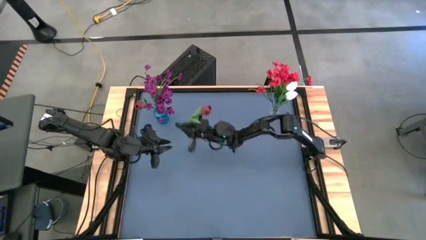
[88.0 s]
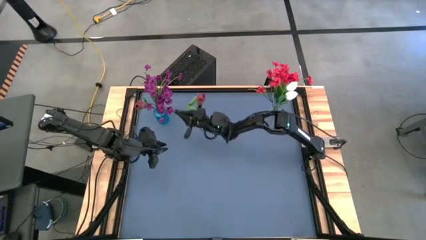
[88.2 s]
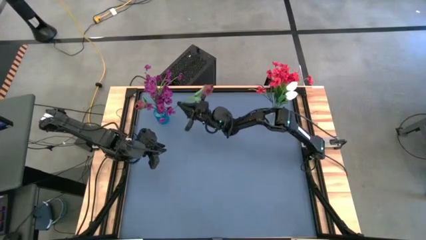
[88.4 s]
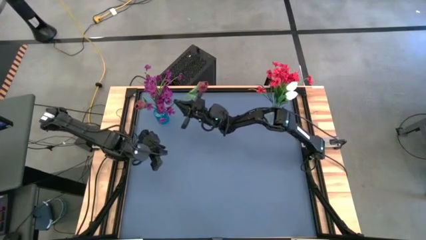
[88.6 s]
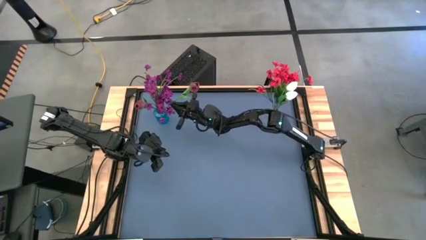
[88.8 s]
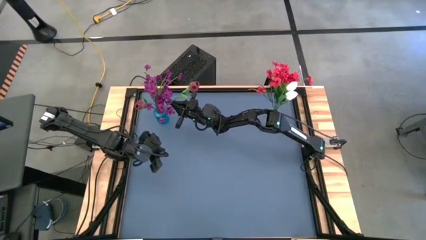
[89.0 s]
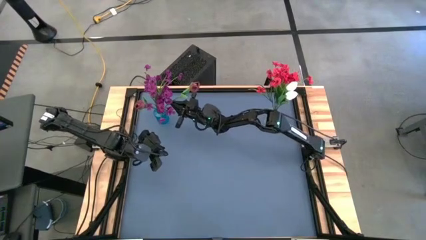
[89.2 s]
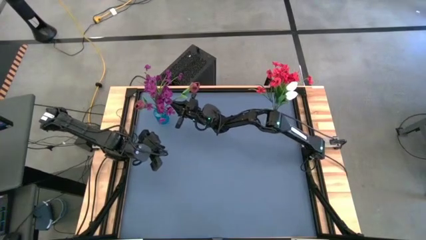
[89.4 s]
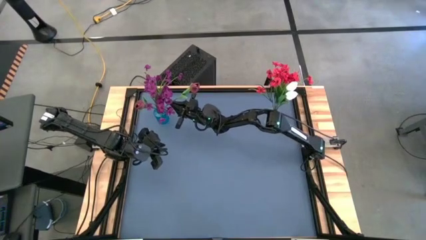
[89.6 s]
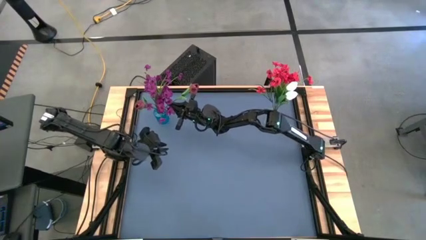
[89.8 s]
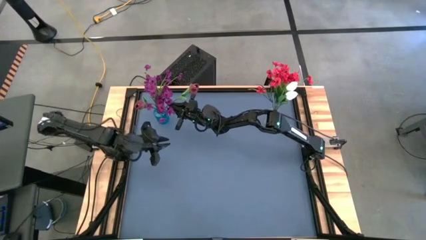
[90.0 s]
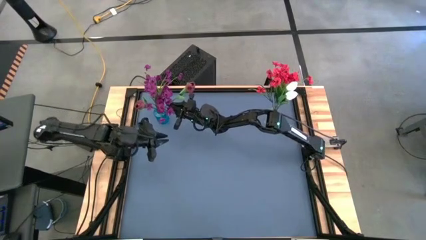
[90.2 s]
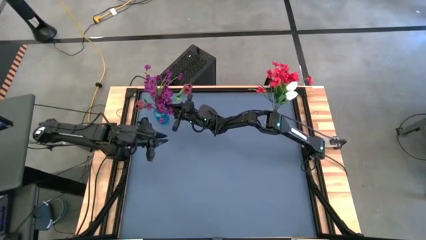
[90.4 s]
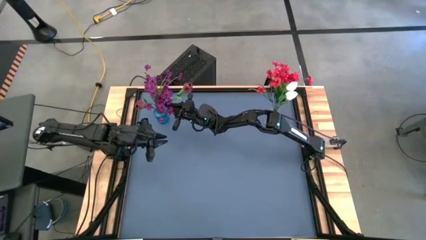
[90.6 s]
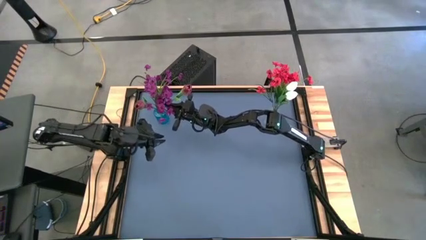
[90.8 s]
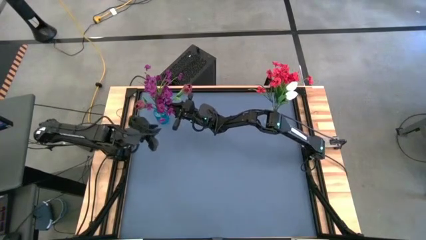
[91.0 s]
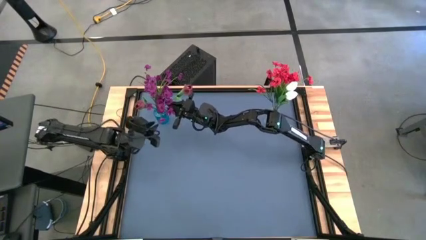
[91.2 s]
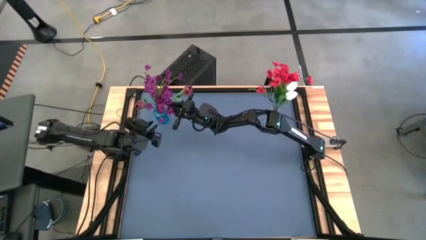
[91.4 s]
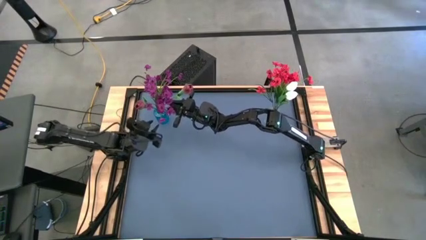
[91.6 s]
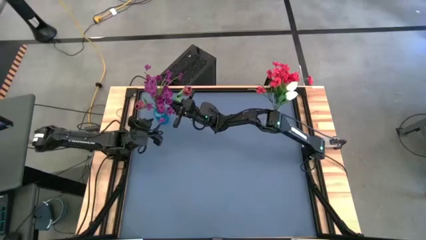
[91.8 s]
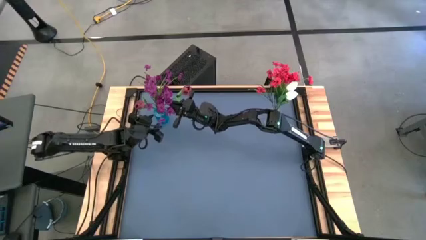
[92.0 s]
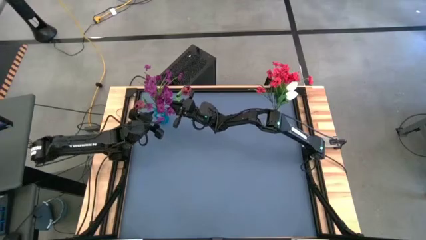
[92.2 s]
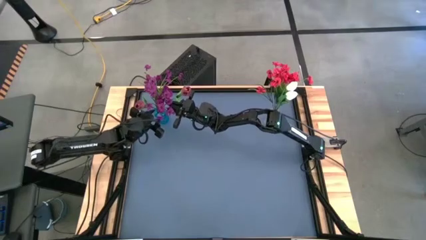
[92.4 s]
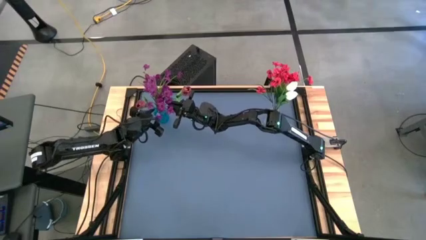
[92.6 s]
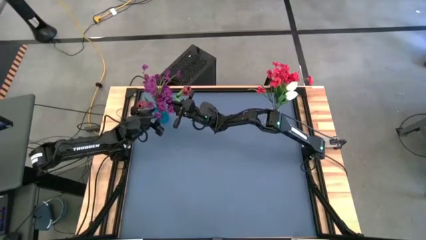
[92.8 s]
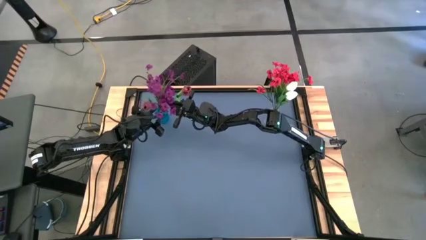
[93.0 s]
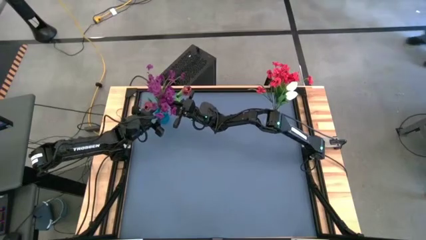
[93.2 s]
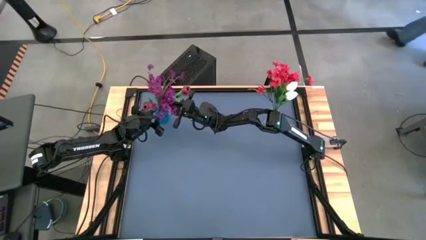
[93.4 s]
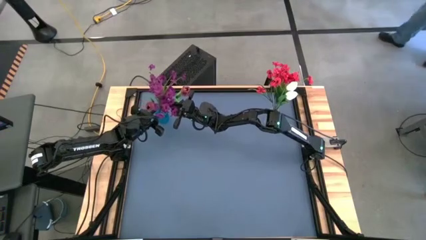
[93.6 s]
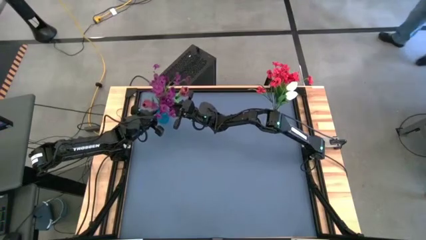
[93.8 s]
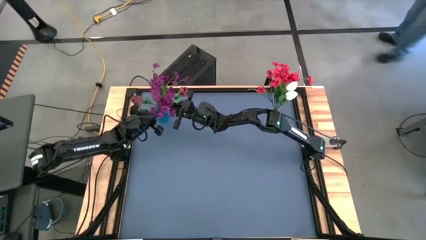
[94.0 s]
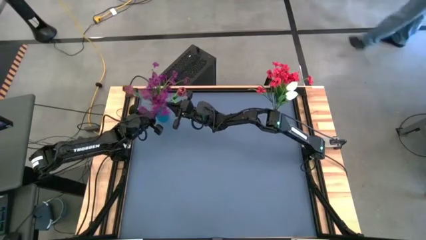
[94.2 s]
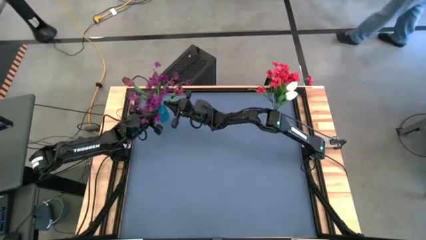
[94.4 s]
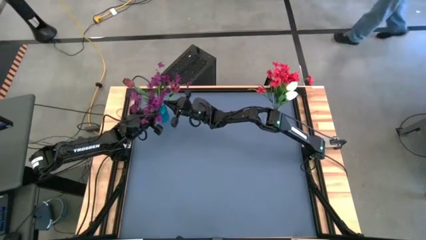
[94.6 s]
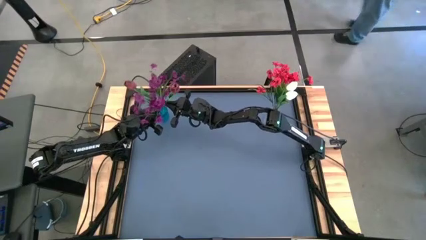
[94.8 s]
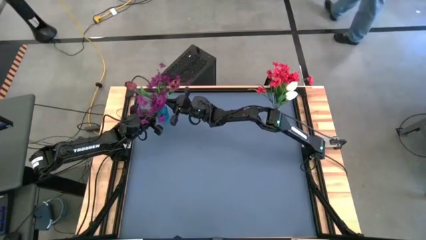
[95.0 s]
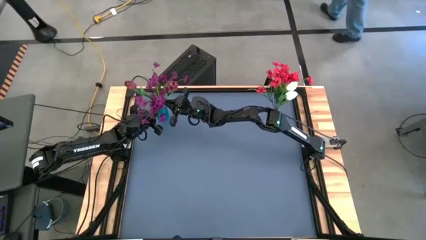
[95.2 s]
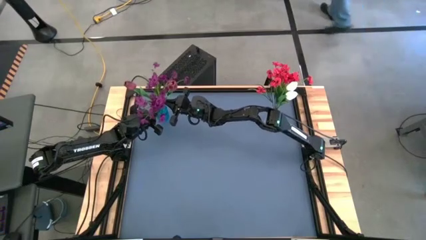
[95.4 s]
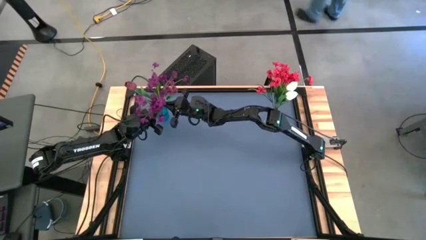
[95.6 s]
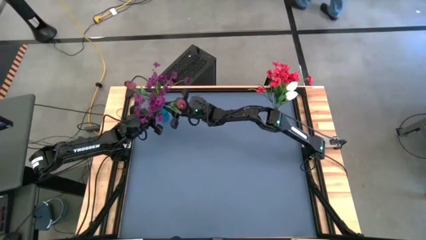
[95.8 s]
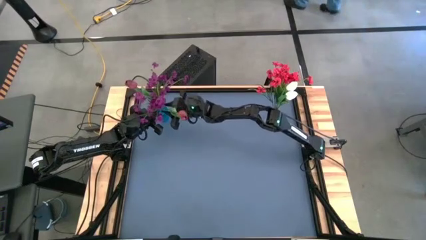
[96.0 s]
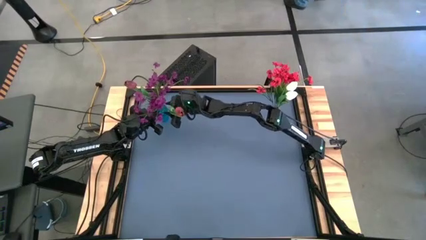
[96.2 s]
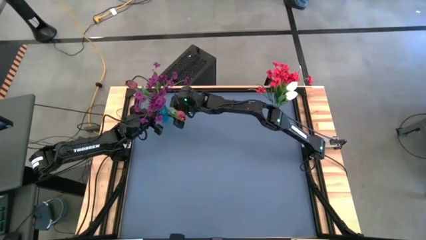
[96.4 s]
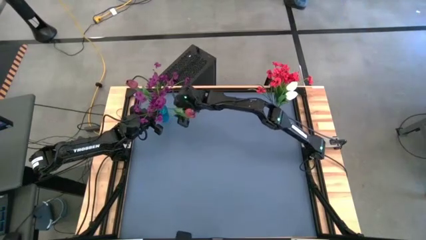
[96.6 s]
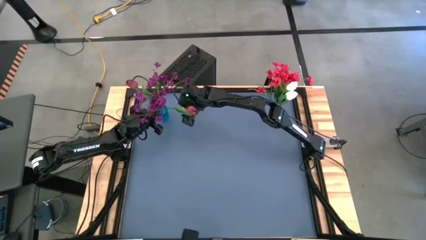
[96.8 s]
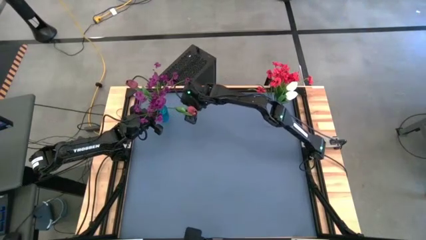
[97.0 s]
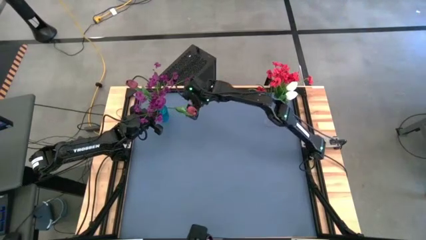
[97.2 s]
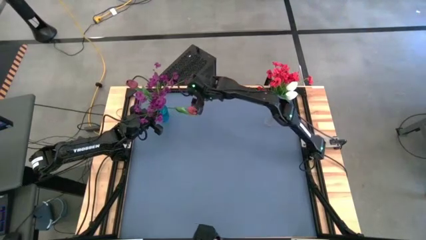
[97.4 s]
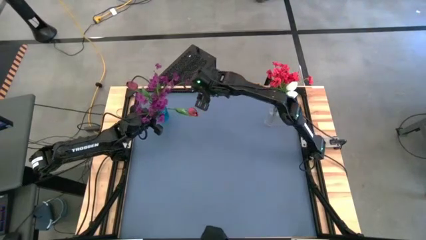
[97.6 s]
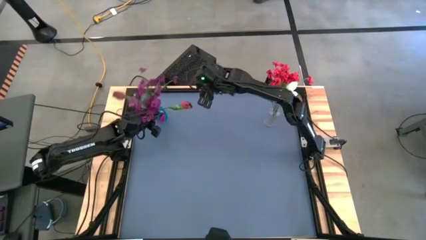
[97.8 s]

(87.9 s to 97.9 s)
Task: Sort flowers into vase by color
Put the red tulip into the blue vase

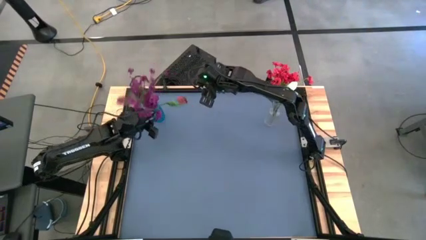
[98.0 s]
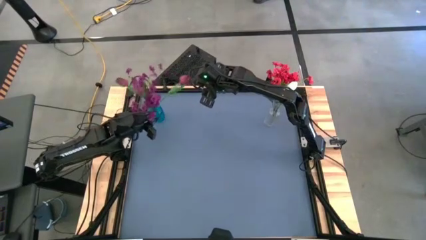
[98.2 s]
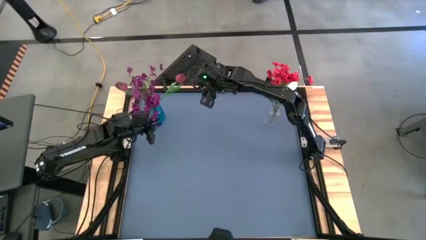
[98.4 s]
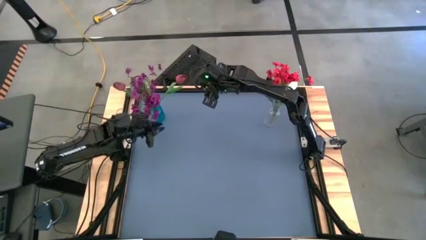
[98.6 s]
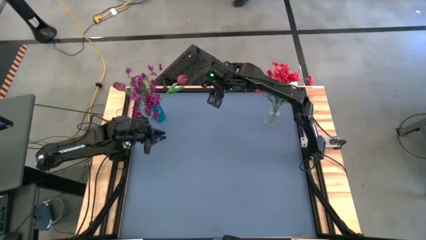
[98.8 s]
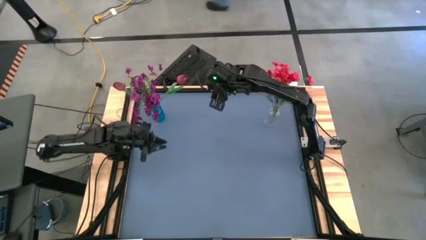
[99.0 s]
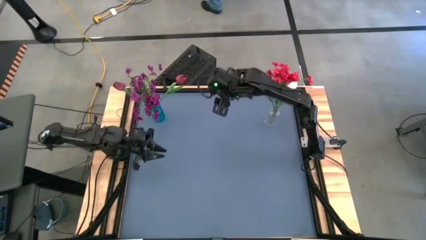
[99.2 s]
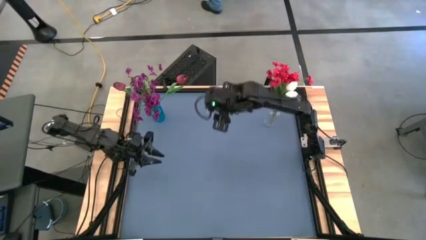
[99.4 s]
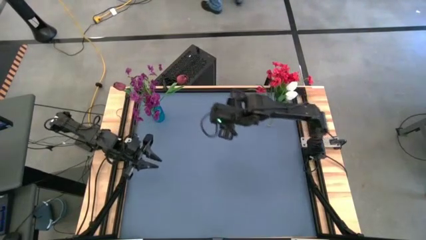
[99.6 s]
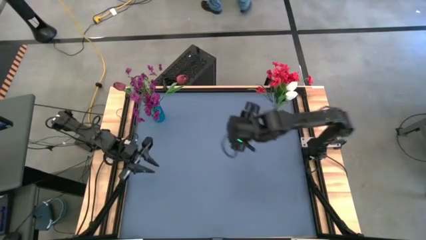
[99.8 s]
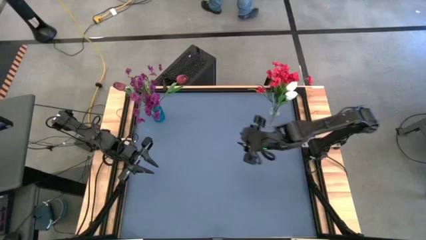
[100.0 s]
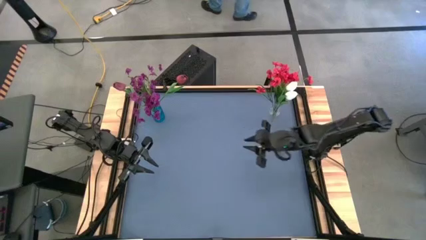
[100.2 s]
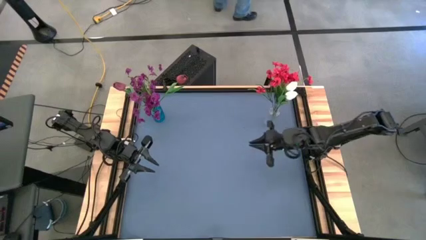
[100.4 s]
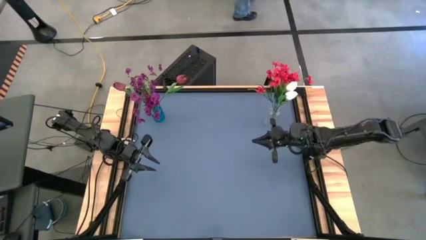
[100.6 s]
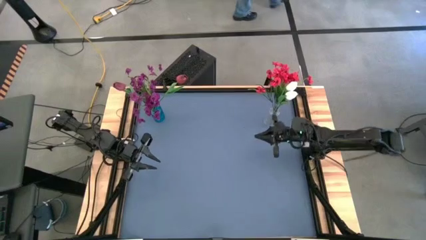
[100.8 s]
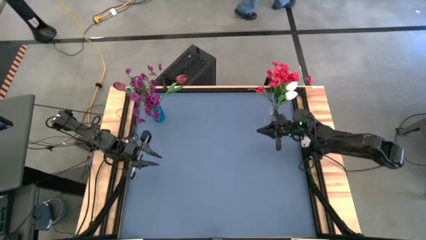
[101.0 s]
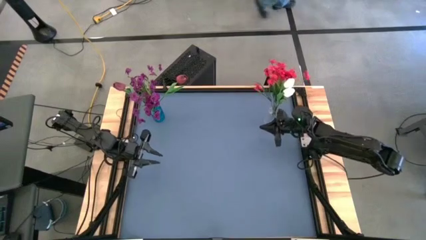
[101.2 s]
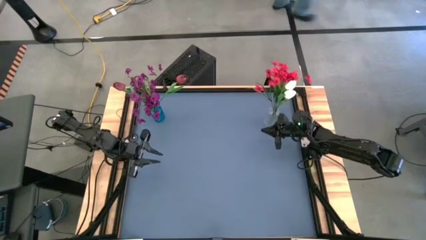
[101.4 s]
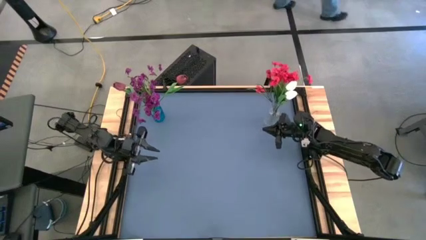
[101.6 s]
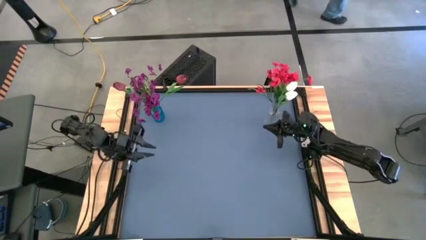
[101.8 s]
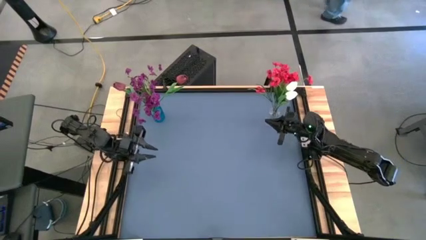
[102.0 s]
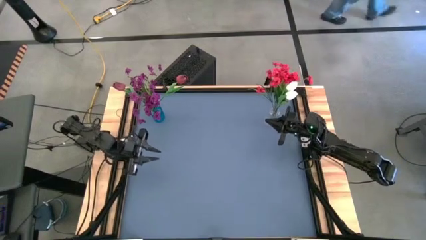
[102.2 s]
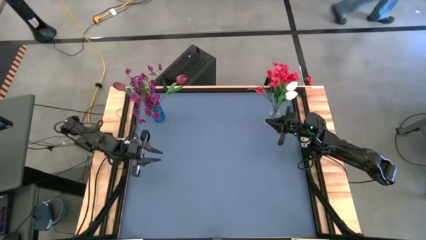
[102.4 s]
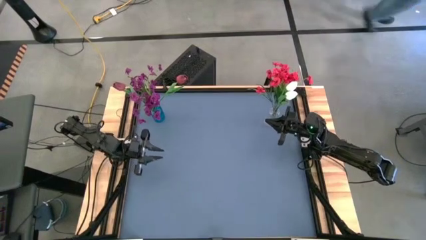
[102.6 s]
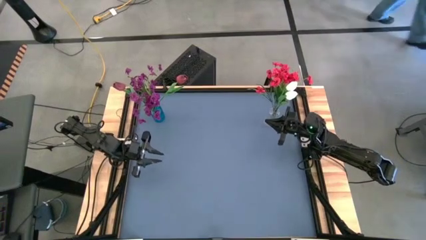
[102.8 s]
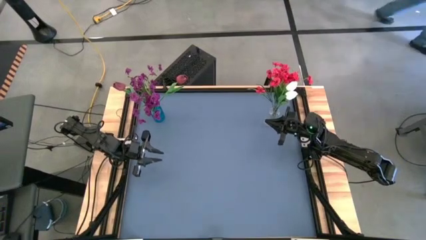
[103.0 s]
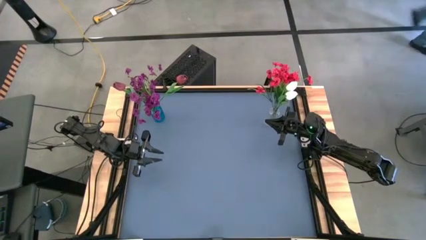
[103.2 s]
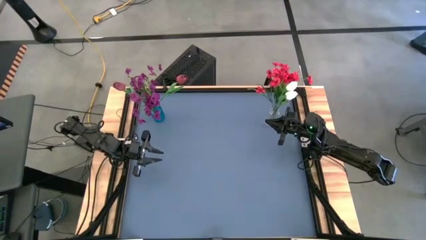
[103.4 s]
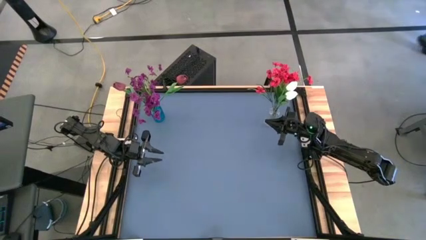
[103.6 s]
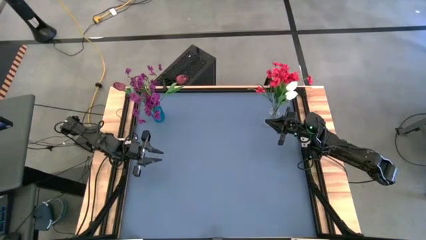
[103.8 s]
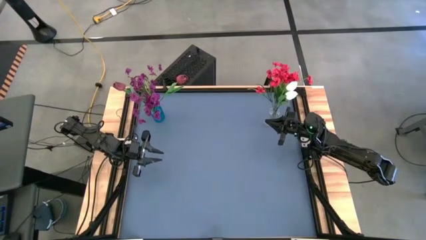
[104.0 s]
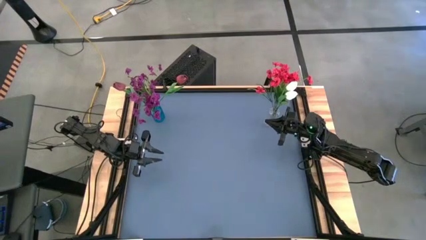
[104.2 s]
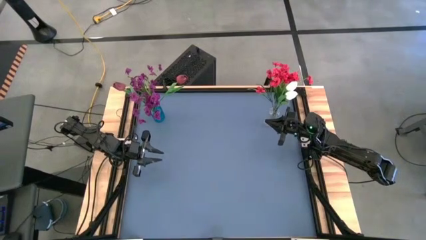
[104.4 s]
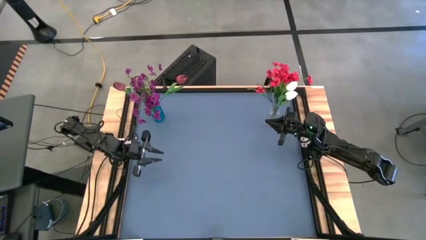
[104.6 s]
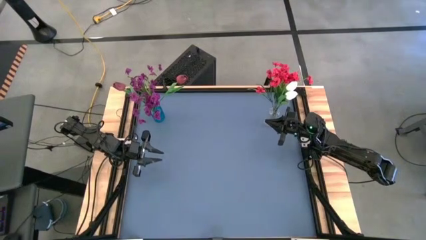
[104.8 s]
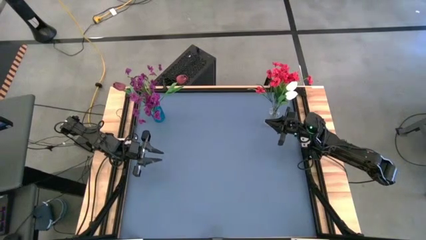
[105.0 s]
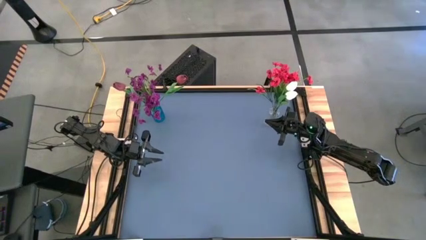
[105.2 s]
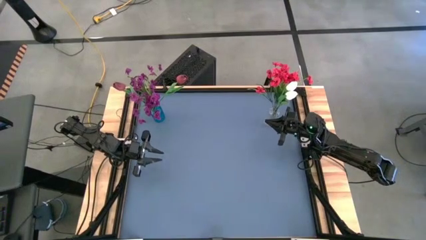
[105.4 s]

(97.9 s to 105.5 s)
Return to Home Position

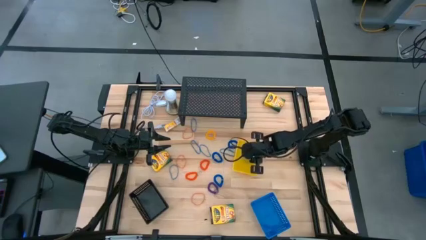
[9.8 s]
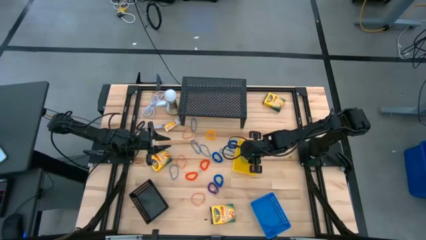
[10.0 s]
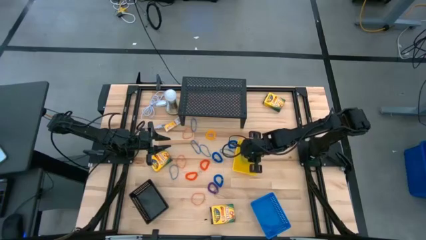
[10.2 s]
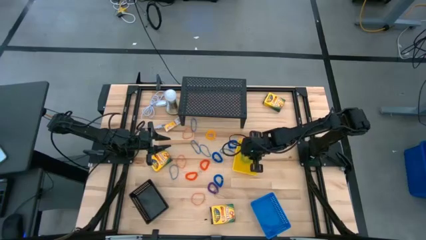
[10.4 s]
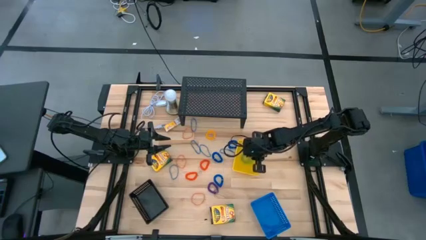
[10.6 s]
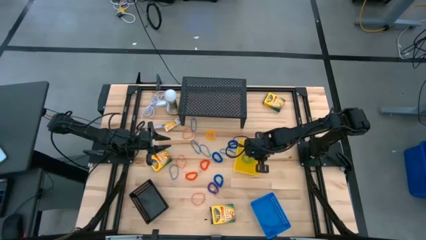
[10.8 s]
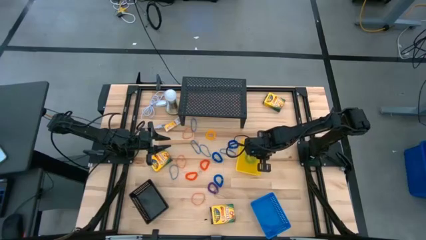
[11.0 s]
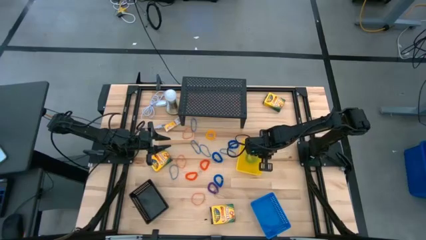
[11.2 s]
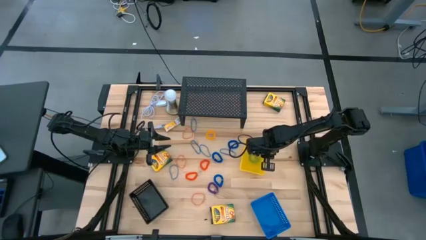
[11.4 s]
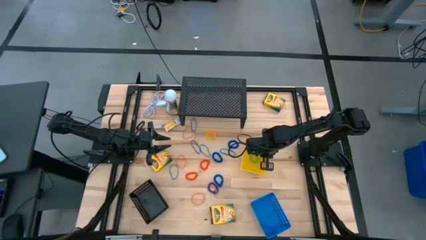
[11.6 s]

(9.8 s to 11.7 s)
Task: Pick & Place Office Desk Supplies
Adjust the yellow basket on the table
